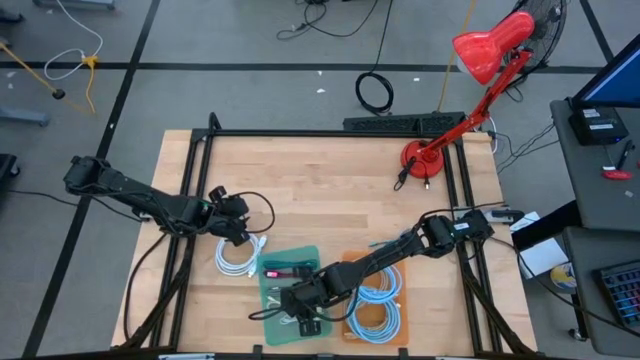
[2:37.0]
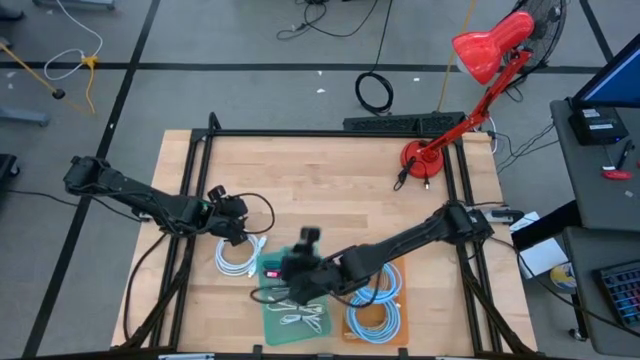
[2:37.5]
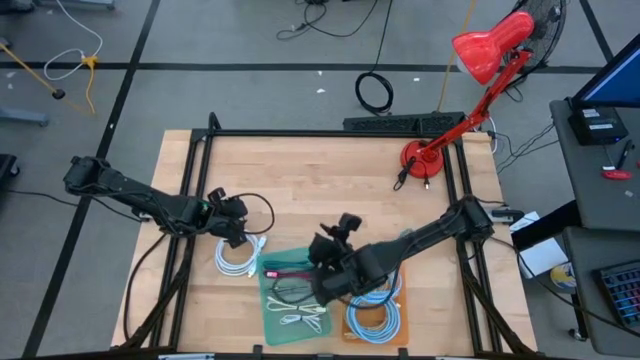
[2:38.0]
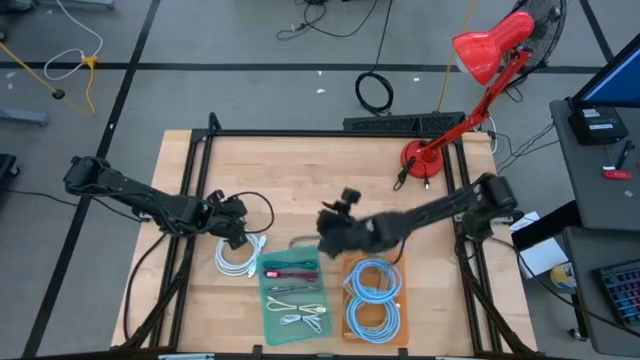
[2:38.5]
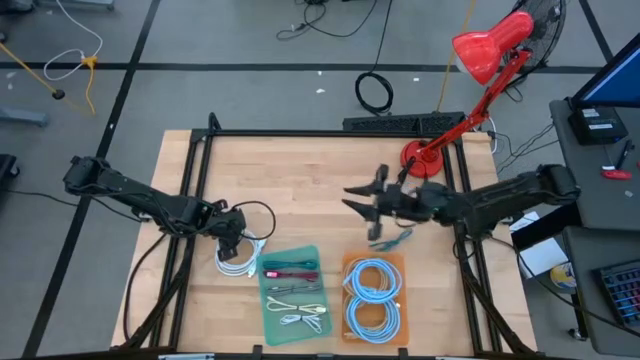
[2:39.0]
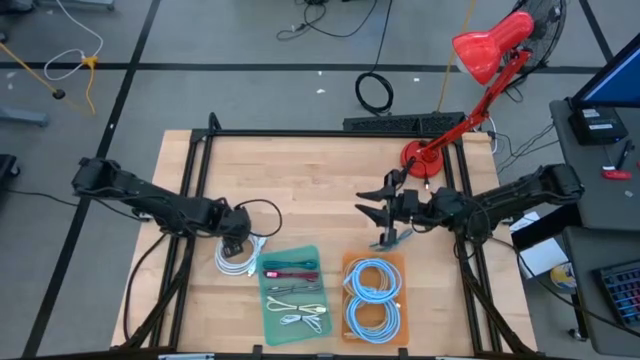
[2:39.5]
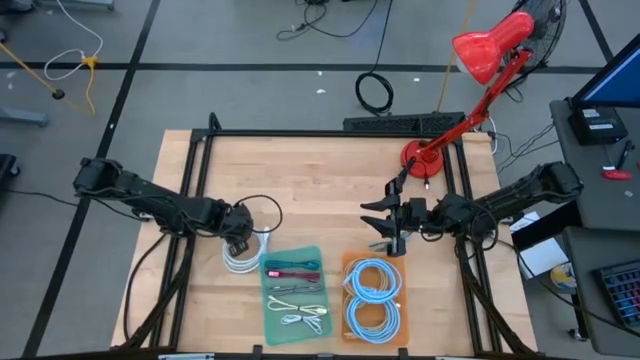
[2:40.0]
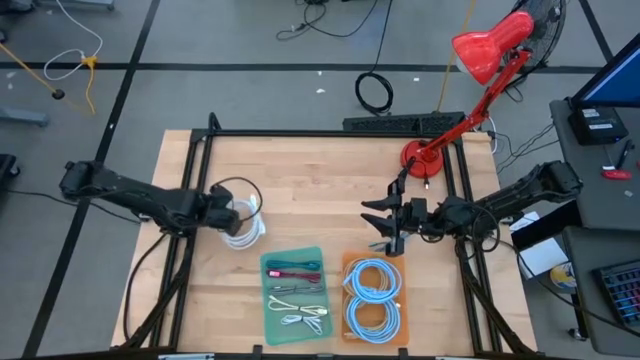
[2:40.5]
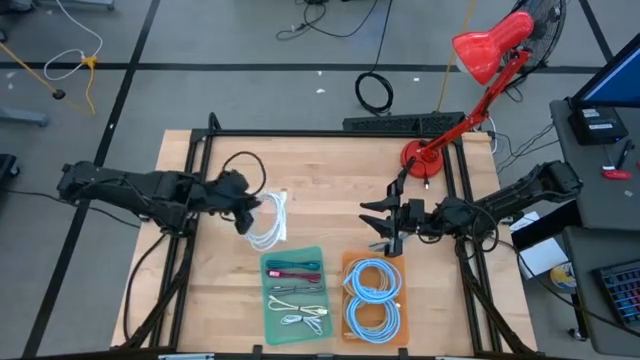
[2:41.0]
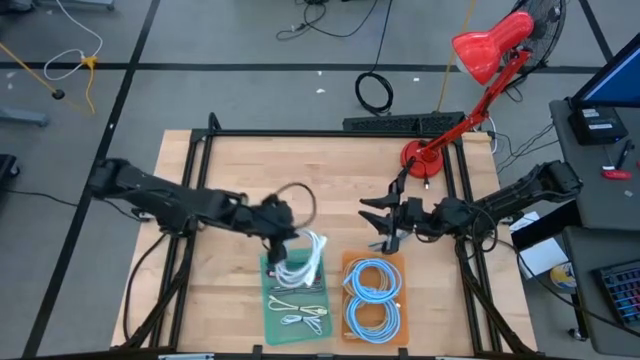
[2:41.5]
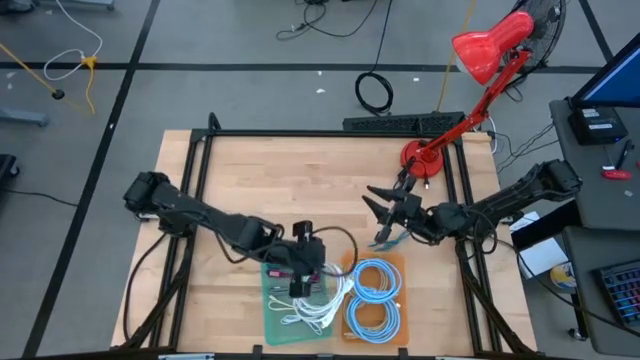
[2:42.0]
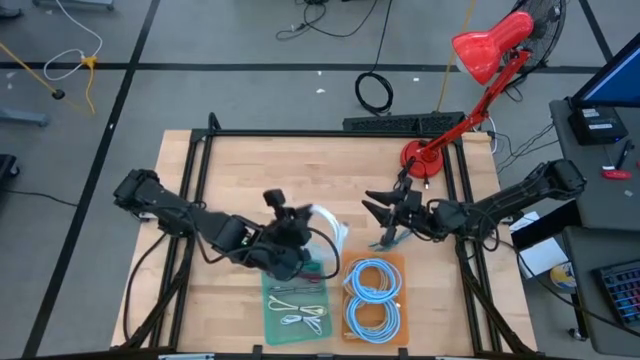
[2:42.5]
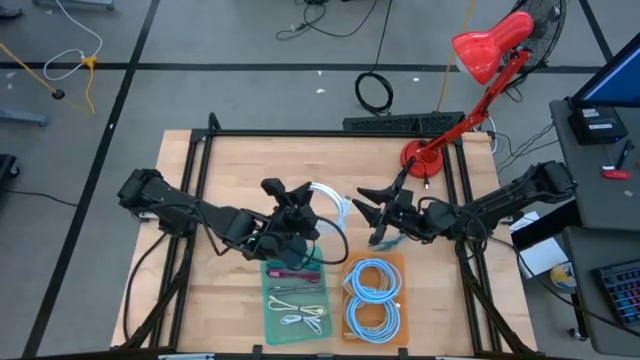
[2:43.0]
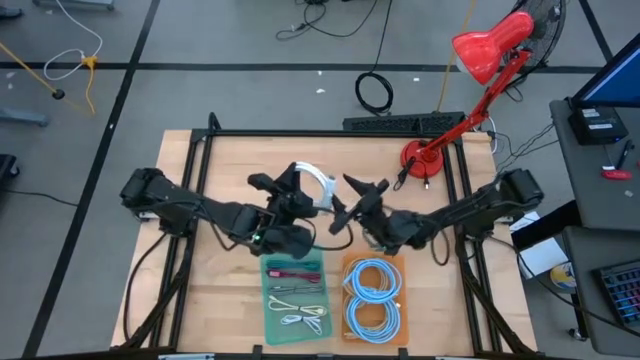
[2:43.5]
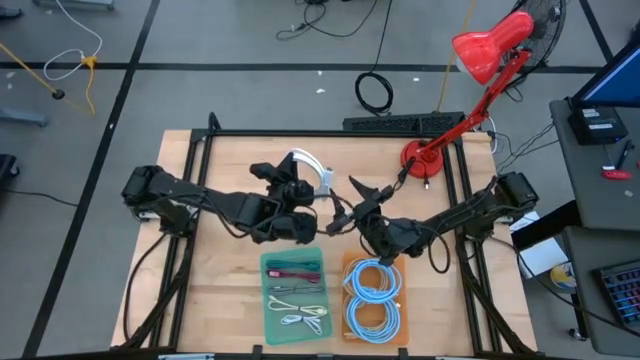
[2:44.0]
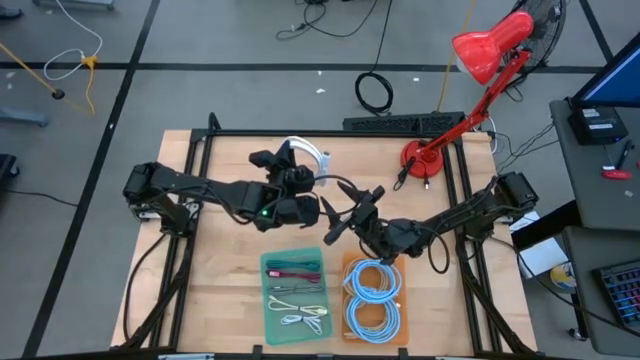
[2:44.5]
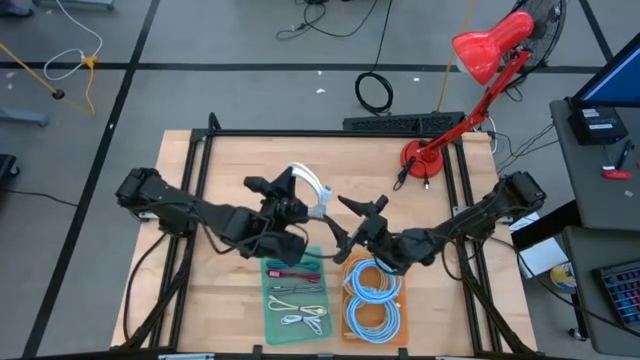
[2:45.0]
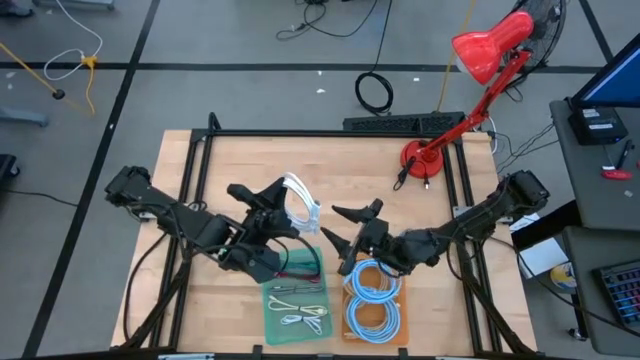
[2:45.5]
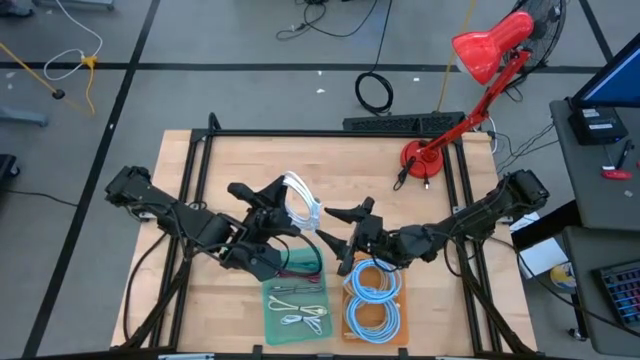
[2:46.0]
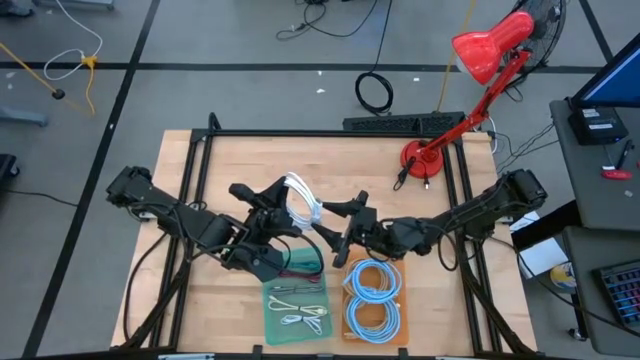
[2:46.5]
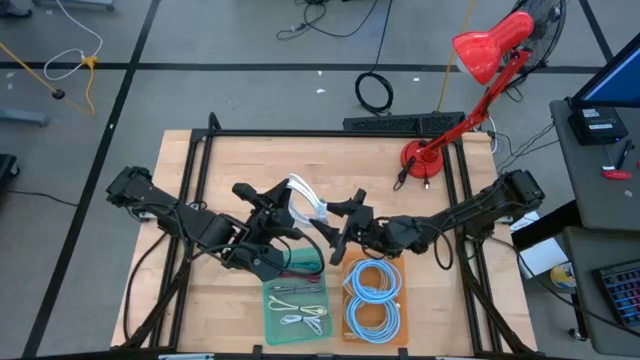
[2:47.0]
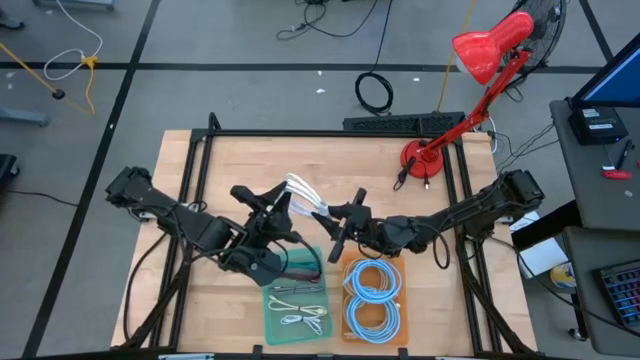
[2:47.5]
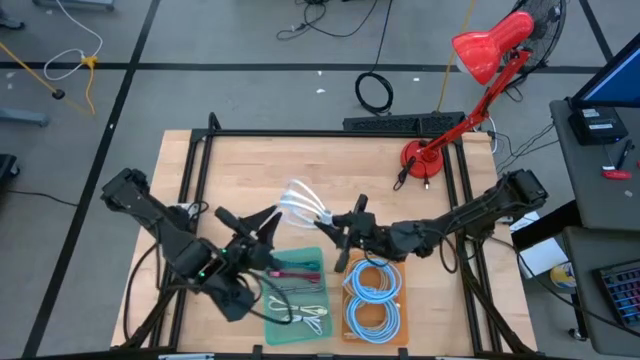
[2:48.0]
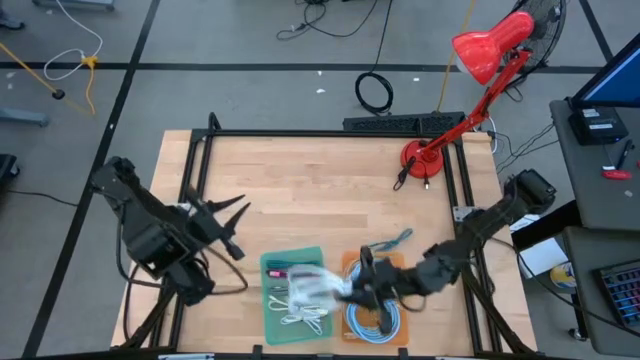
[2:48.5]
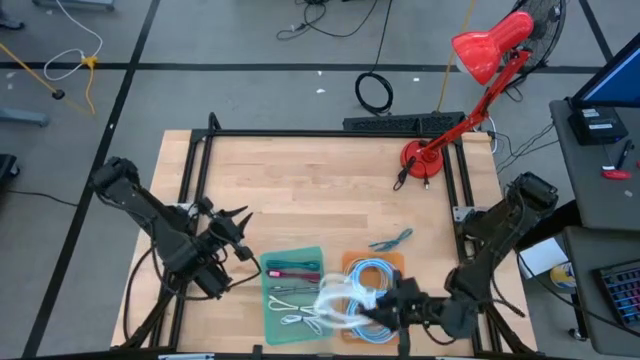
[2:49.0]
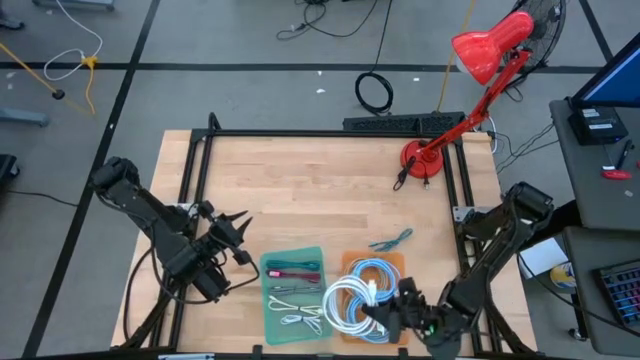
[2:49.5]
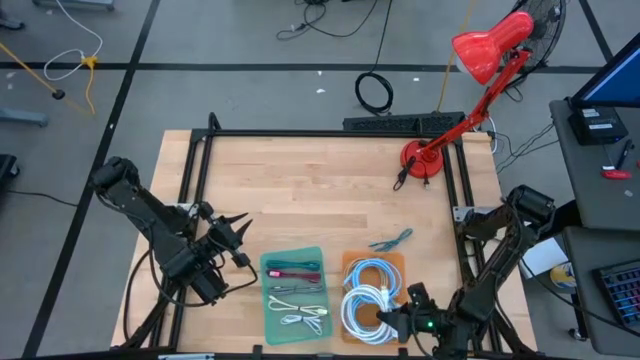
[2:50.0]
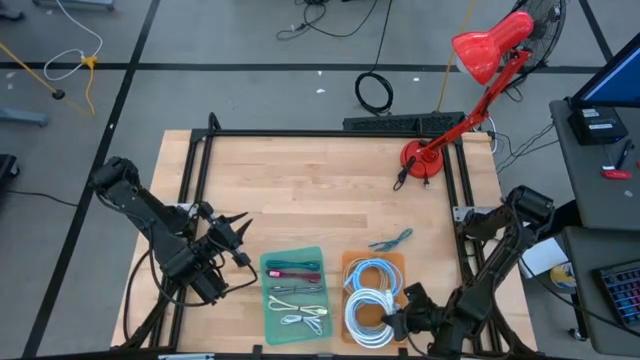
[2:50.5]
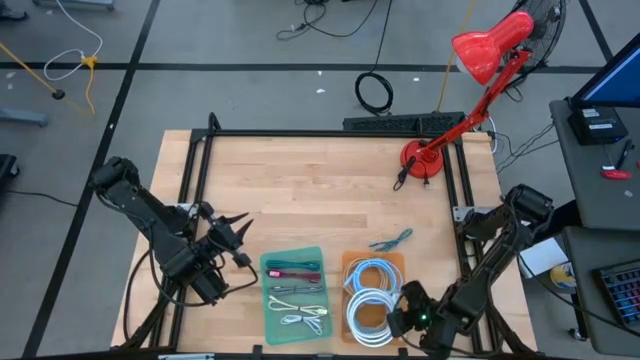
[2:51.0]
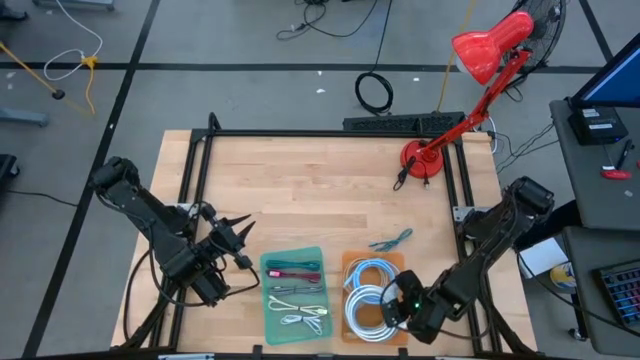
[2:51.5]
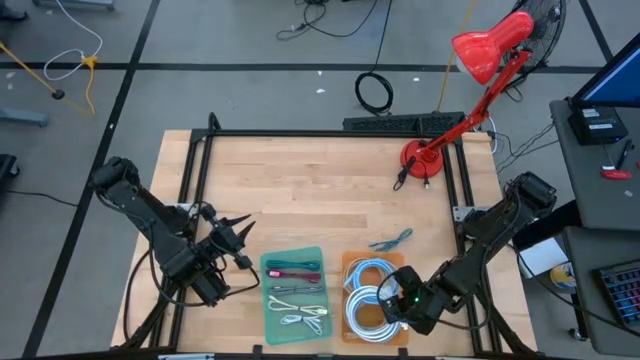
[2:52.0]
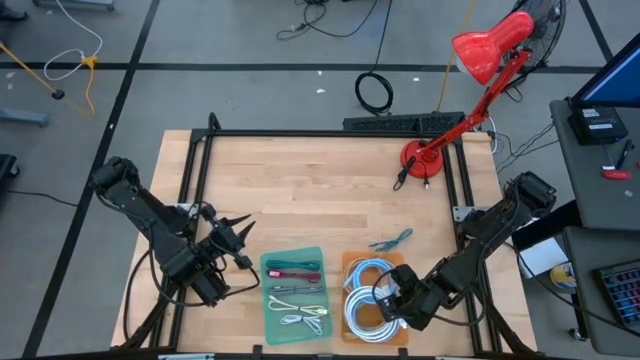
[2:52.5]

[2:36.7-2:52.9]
Task: Pick & Place USB Port
Put the white video cable into the orange bin

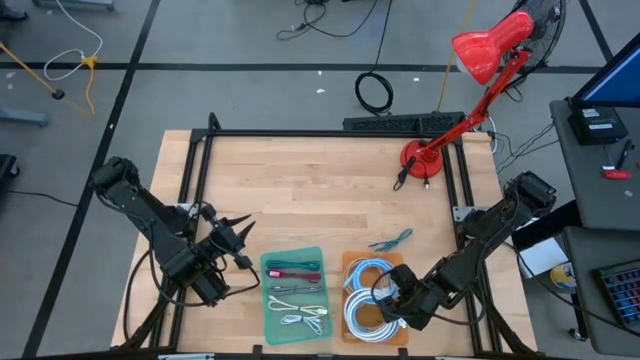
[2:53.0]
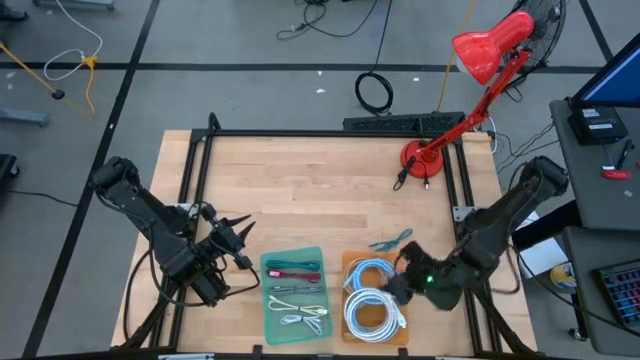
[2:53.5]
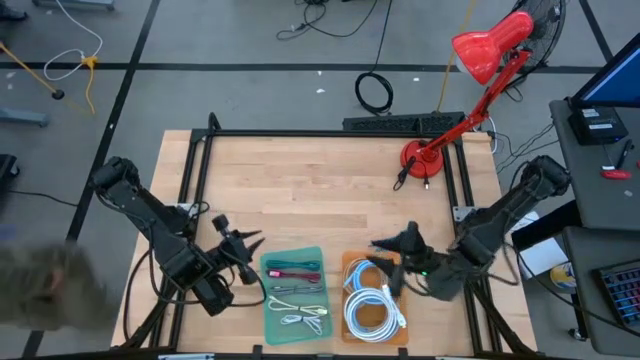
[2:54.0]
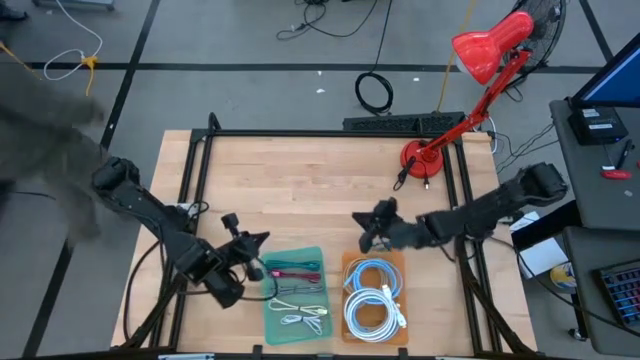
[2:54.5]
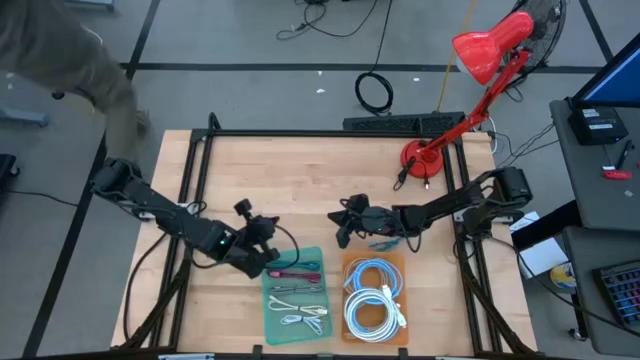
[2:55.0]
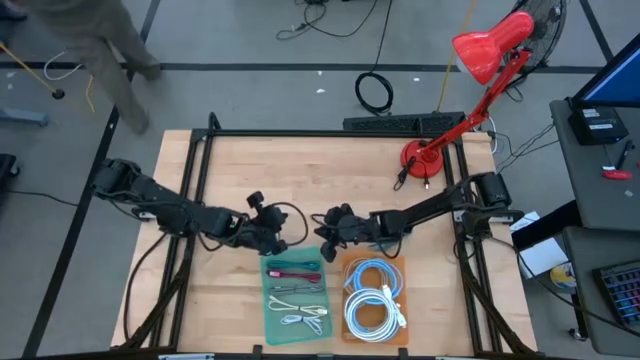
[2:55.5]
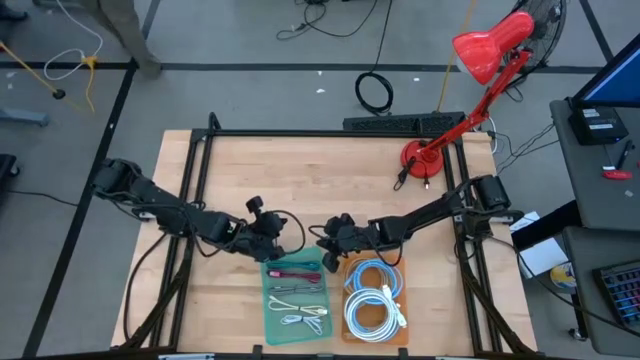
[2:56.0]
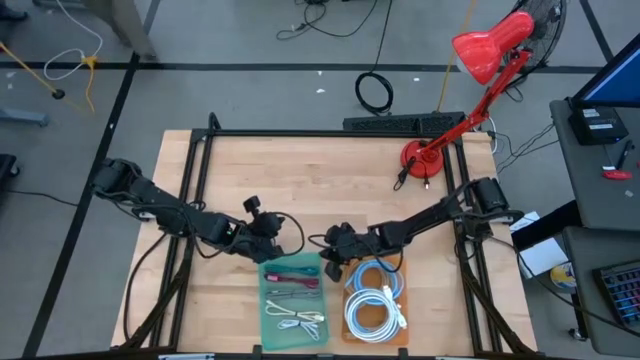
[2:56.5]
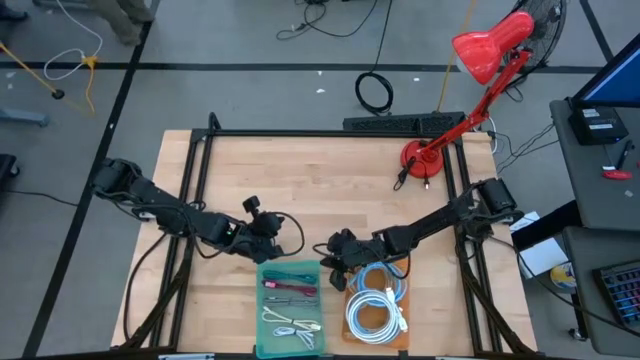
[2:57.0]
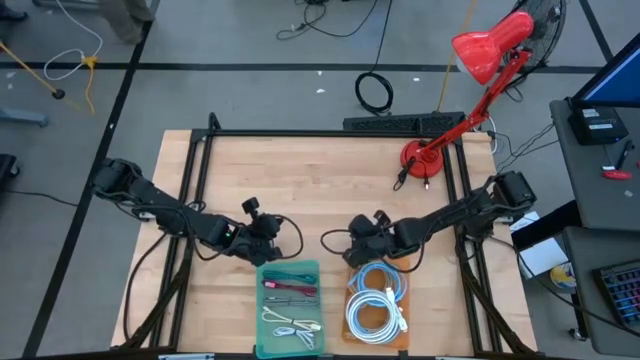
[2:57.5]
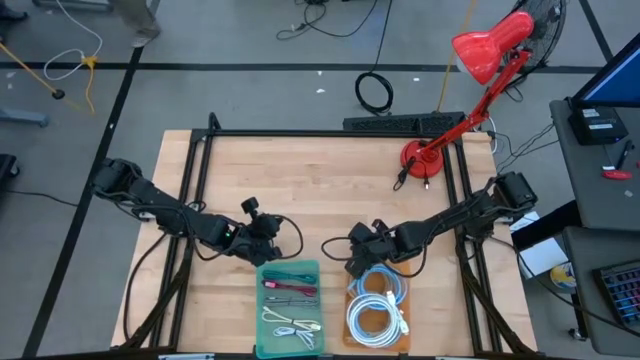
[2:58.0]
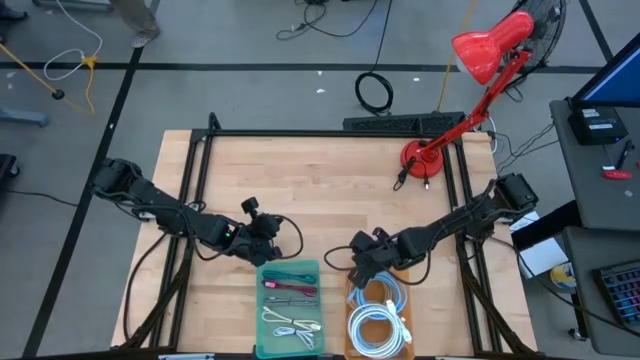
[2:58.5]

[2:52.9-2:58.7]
Adjust the colored bins
